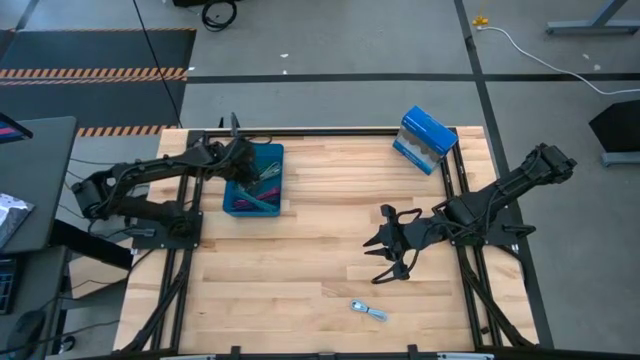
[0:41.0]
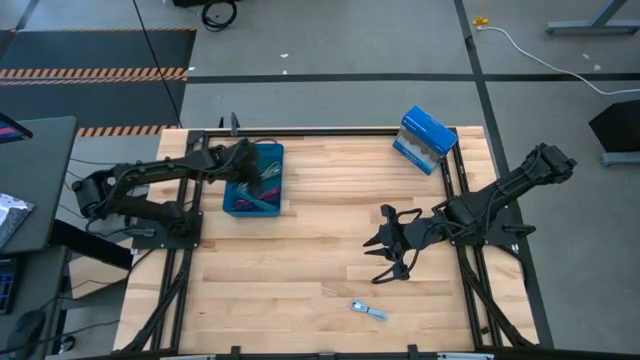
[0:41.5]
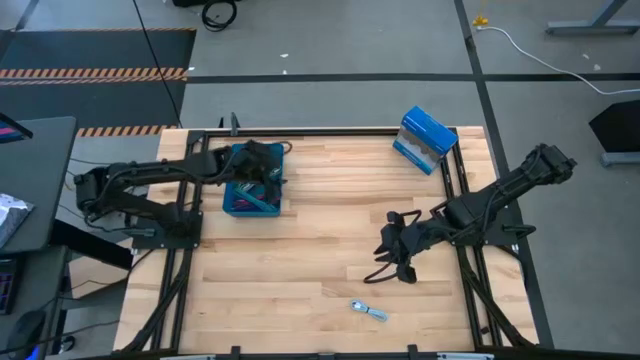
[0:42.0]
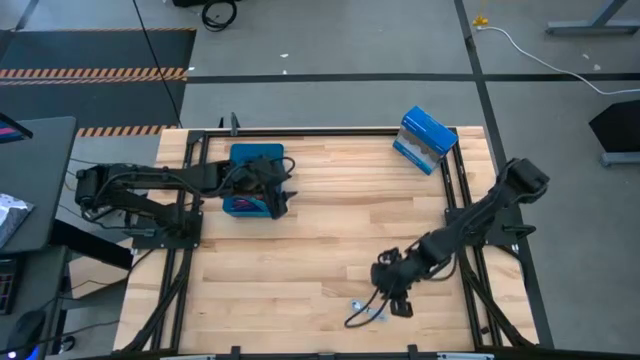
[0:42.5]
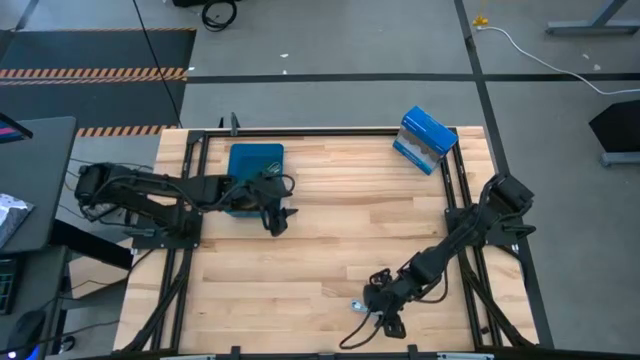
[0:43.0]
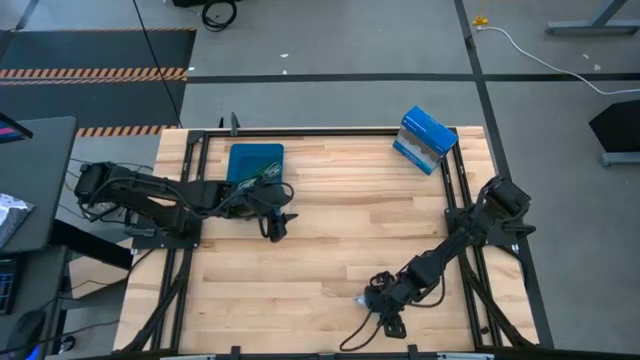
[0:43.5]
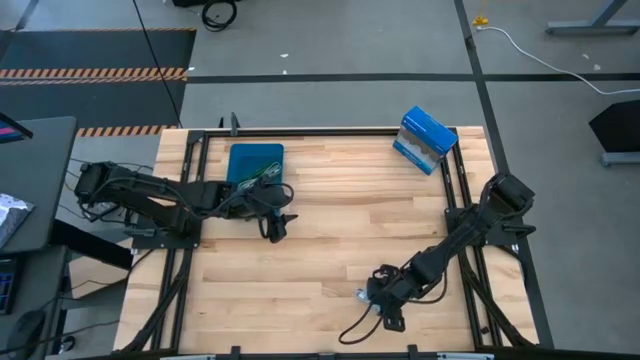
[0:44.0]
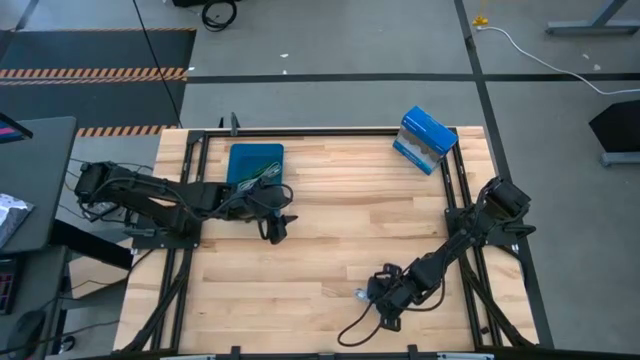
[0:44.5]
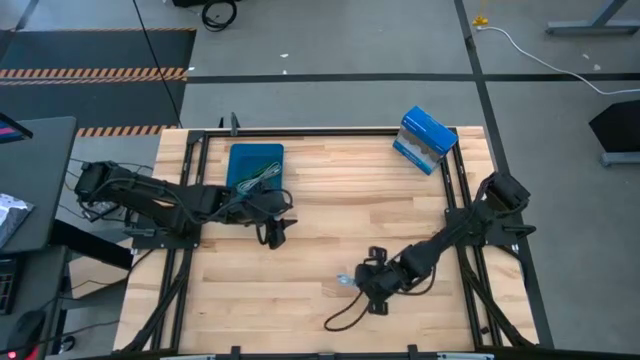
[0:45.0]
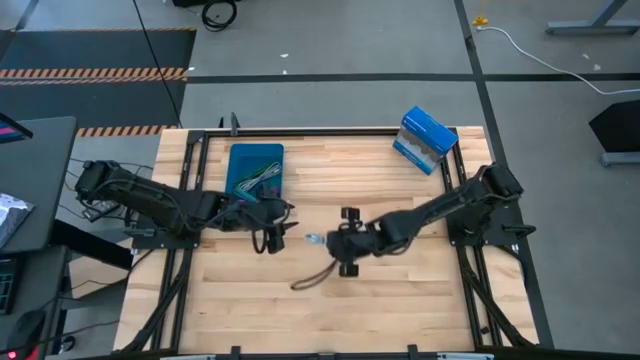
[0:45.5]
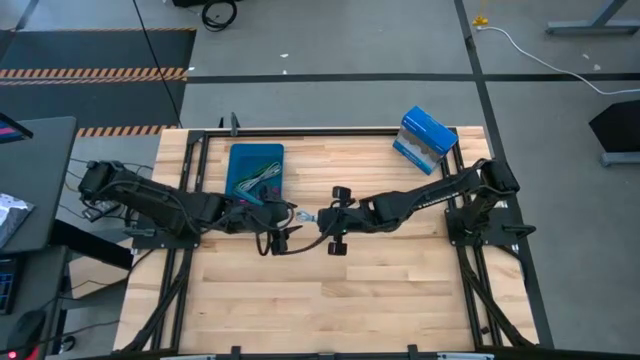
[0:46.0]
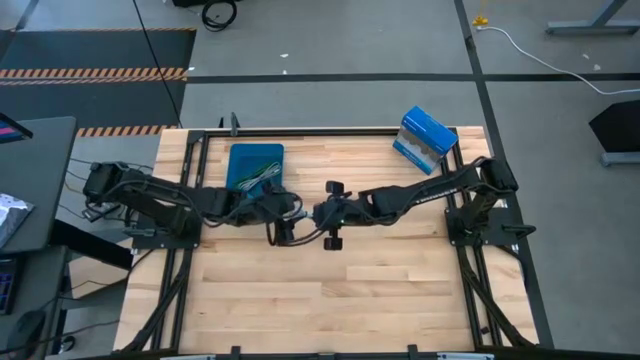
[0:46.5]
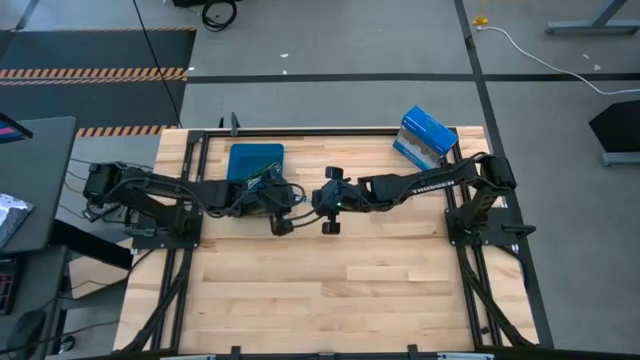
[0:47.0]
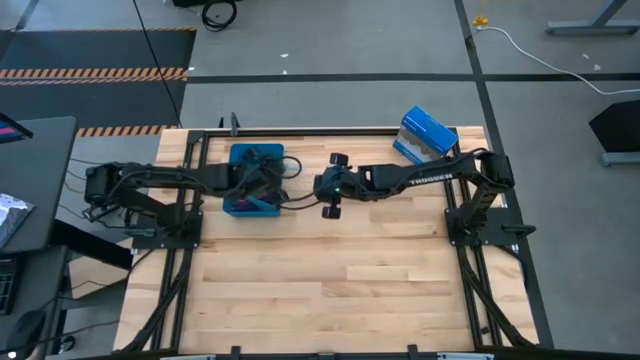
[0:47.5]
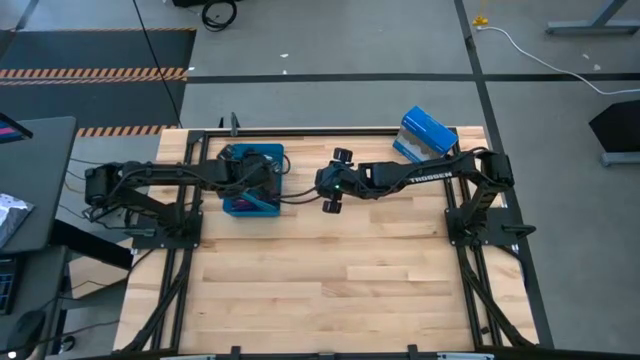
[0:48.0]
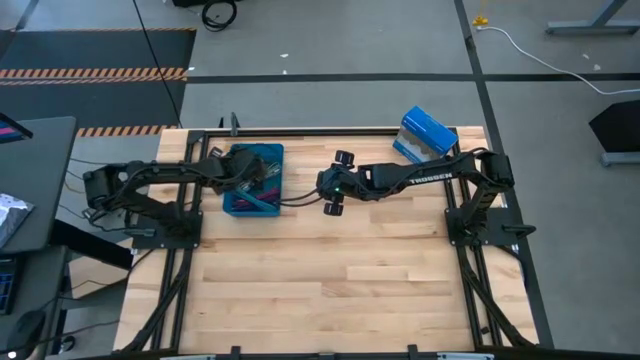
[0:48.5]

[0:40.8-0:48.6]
Task: Pick and place USB-C Cables
Put the light blue charger cable into the blue bin

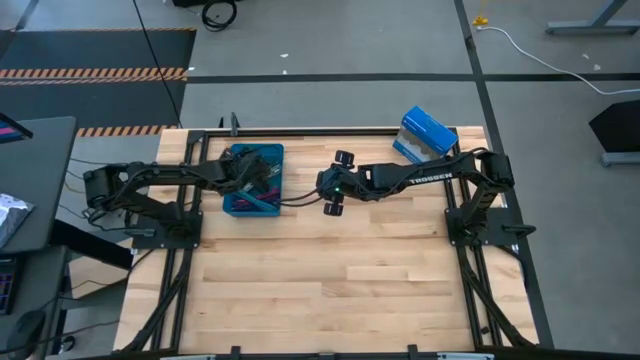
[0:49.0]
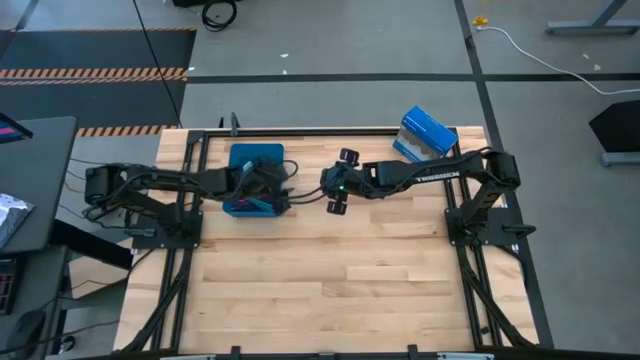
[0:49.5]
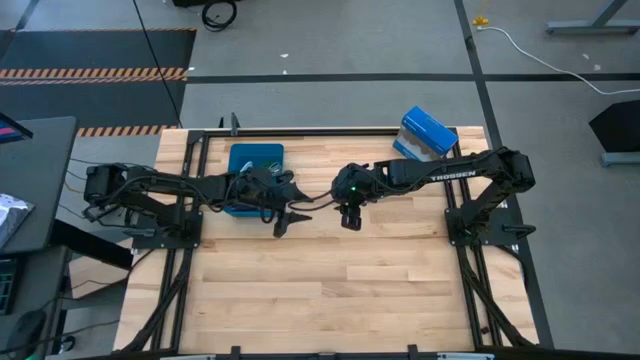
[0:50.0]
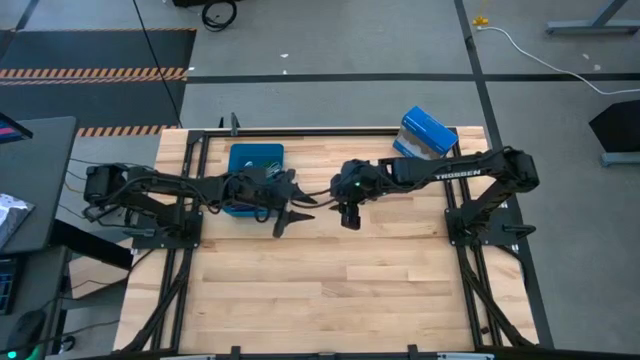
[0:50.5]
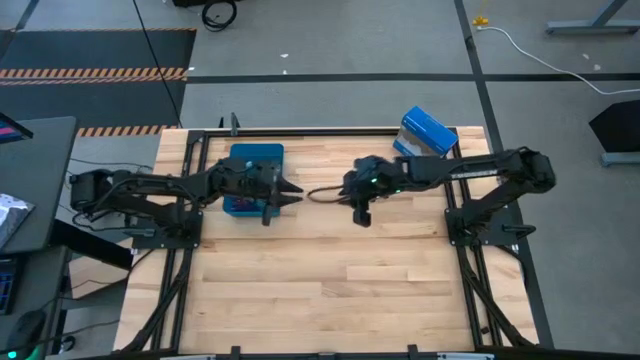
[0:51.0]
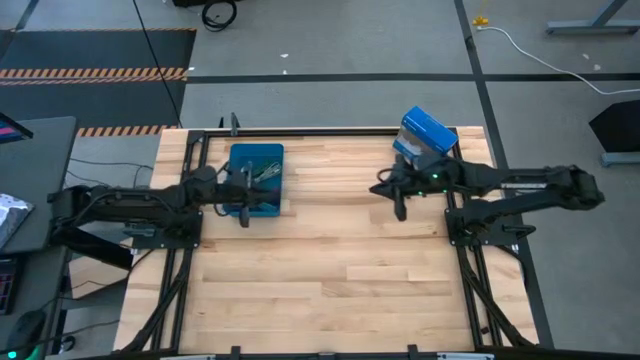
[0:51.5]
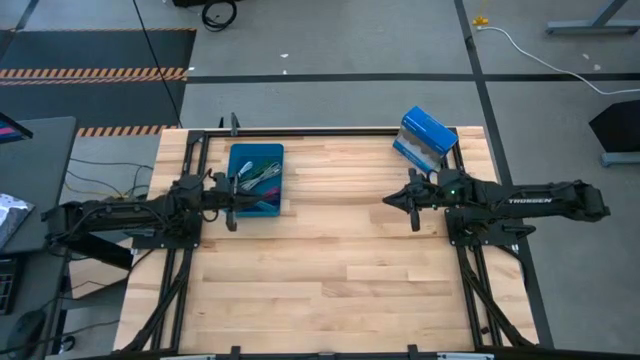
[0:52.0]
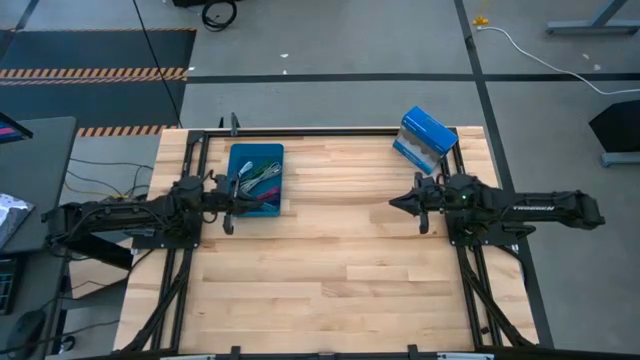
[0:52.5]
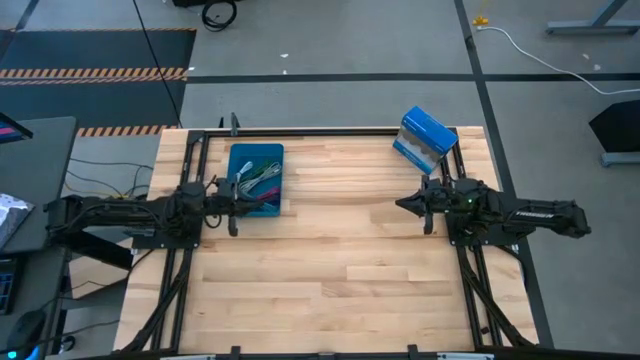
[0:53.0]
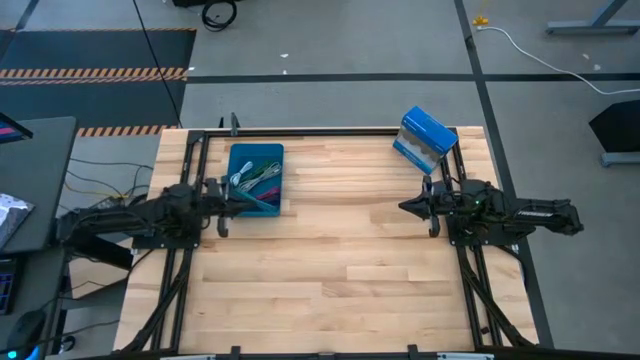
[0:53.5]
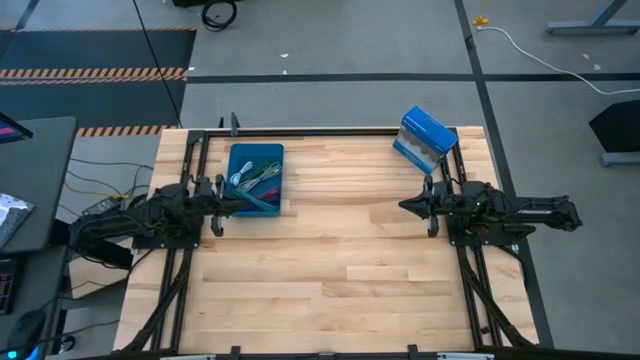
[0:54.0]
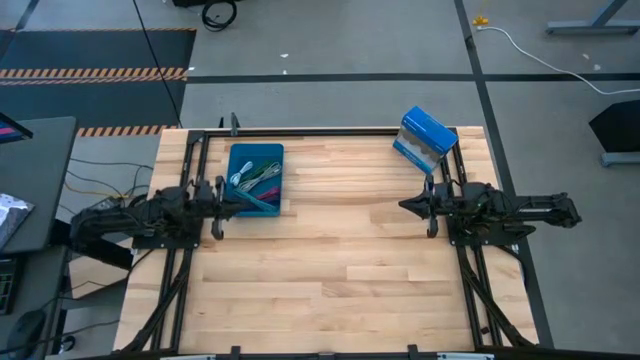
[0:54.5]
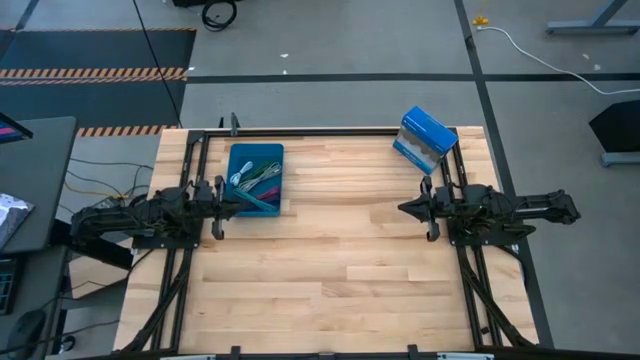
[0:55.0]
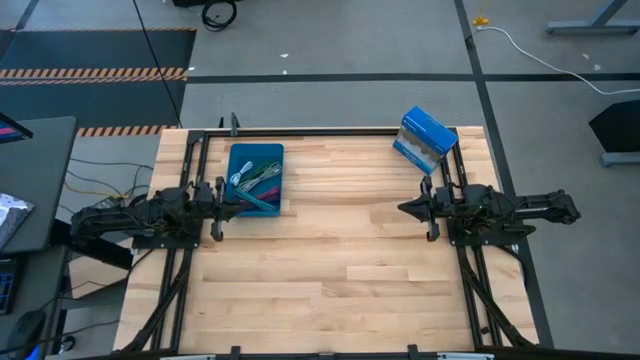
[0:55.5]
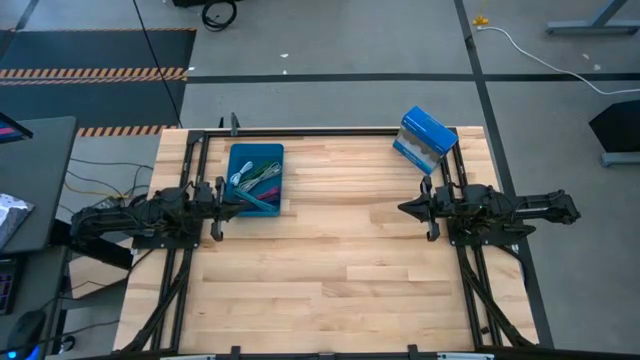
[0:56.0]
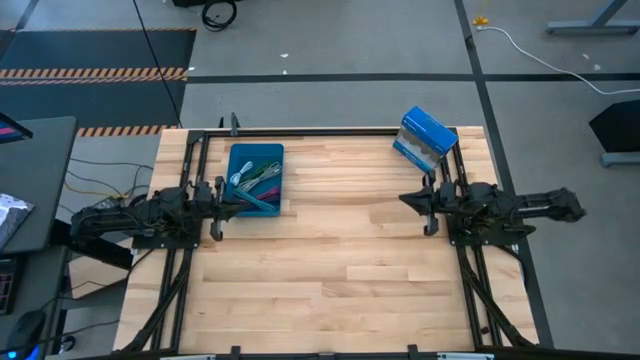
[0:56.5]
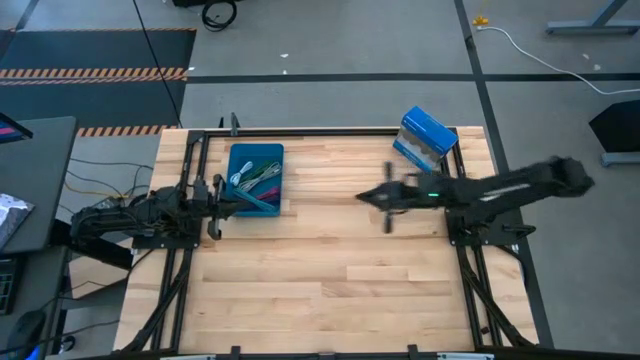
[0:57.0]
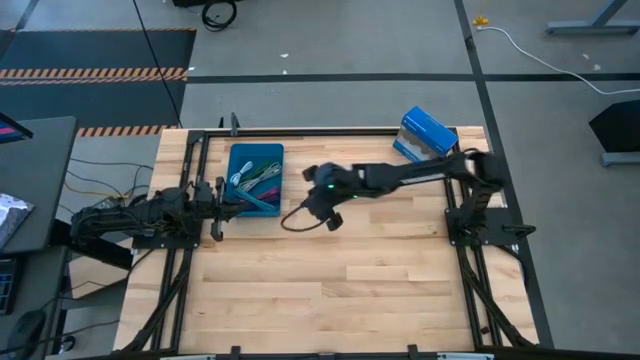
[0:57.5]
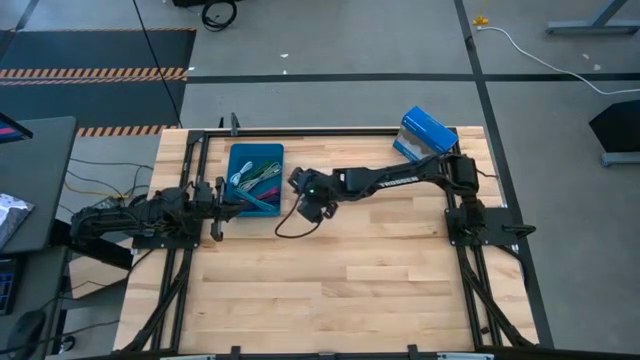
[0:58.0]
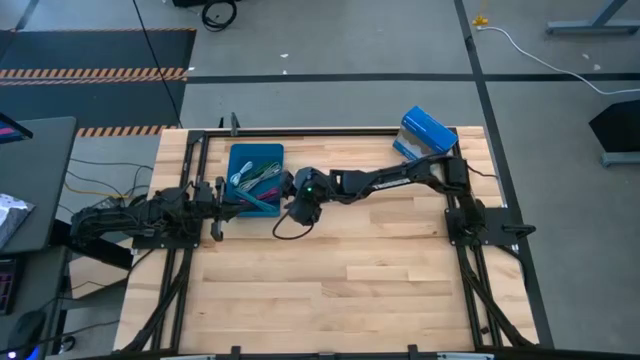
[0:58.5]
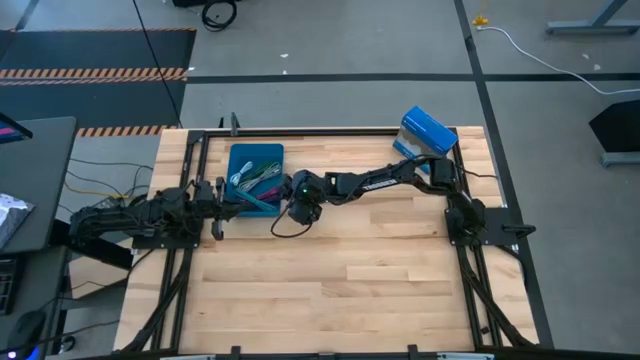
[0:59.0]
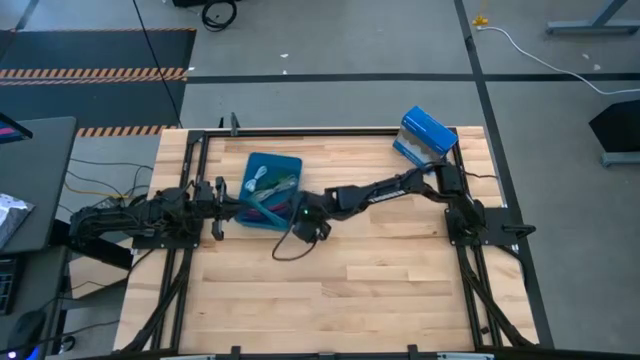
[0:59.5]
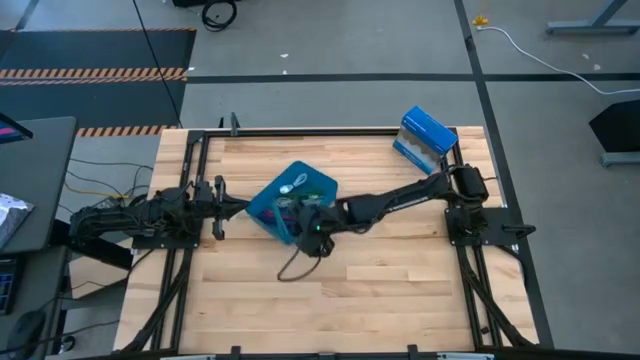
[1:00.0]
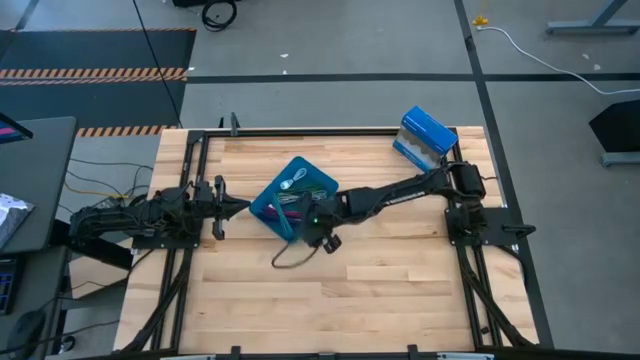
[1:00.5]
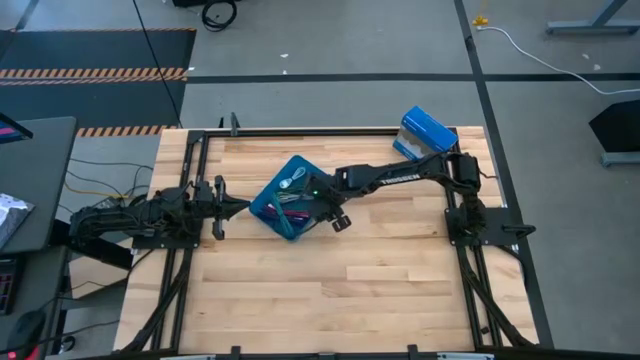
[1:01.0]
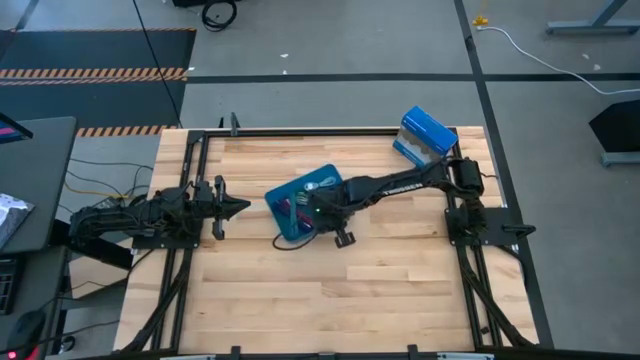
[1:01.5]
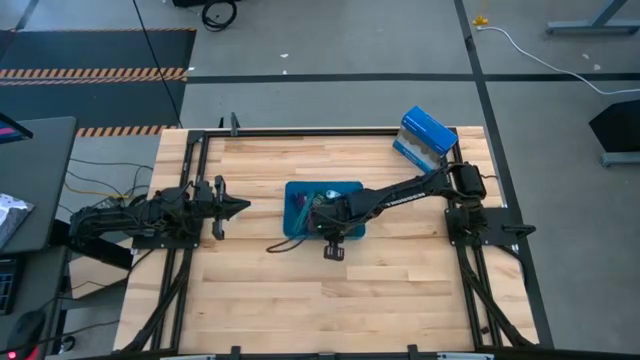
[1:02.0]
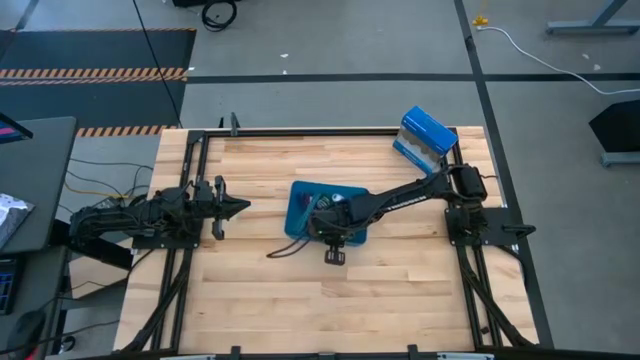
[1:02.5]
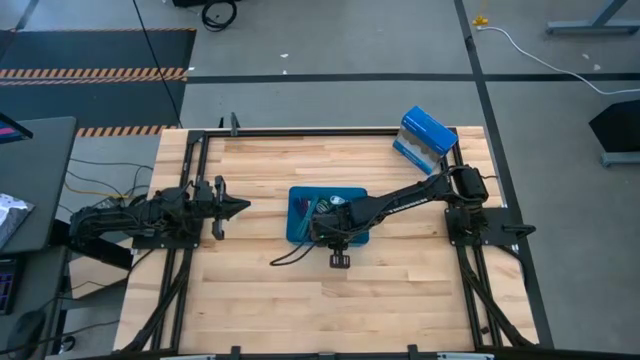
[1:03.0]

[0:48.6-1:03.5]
Move the blue bin to the center of the table
